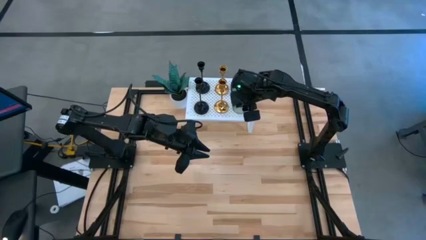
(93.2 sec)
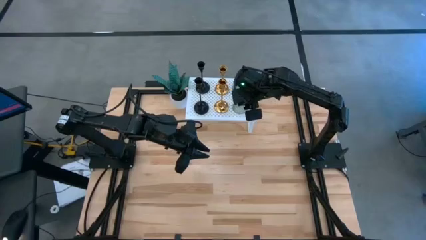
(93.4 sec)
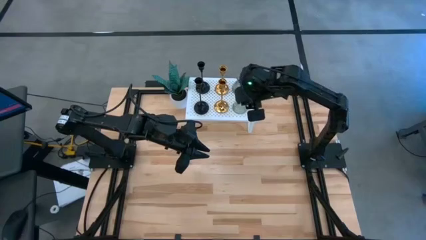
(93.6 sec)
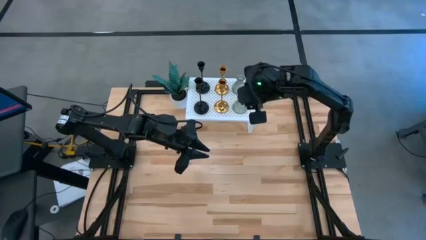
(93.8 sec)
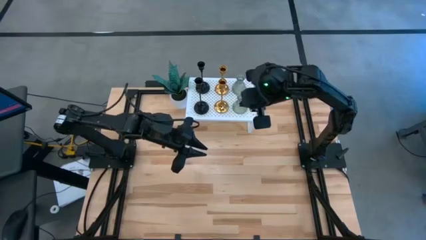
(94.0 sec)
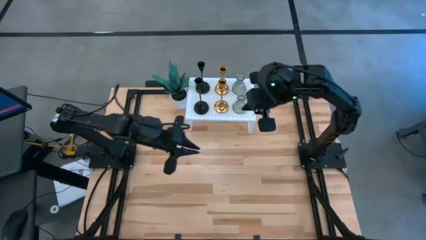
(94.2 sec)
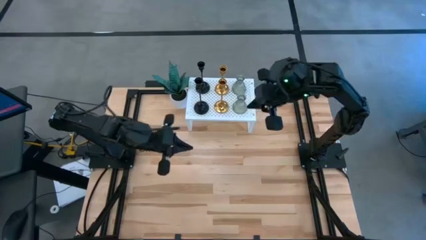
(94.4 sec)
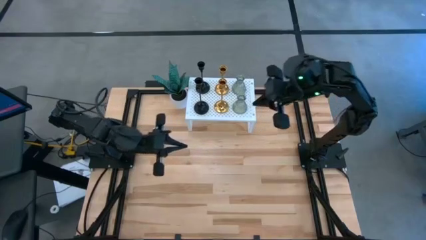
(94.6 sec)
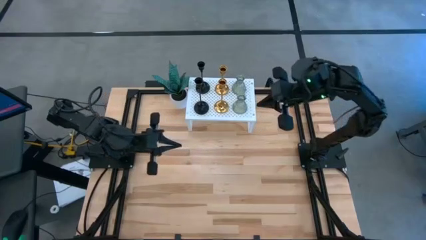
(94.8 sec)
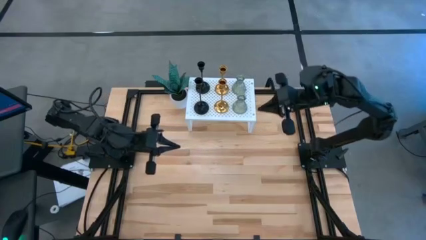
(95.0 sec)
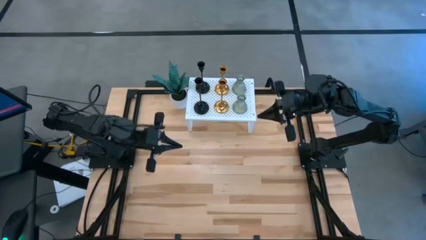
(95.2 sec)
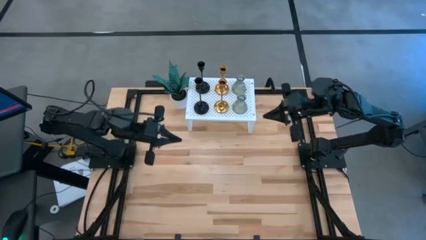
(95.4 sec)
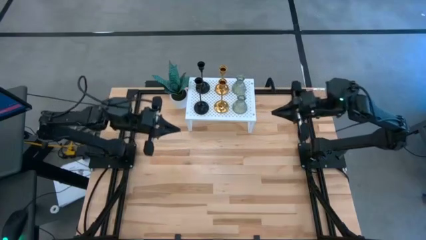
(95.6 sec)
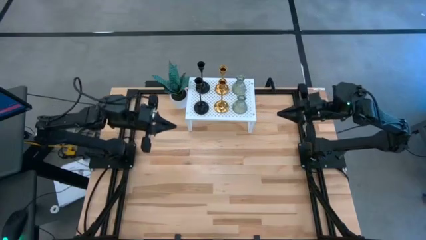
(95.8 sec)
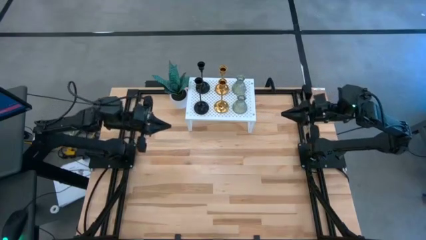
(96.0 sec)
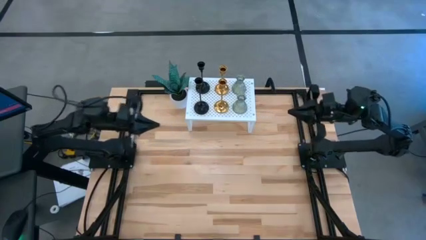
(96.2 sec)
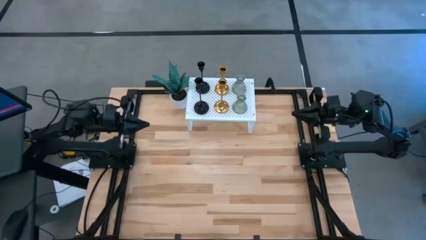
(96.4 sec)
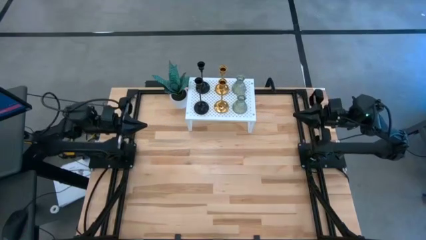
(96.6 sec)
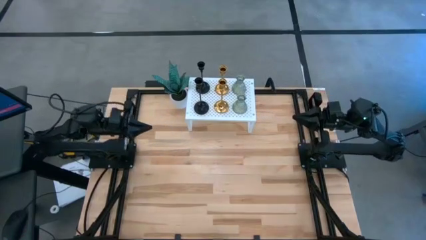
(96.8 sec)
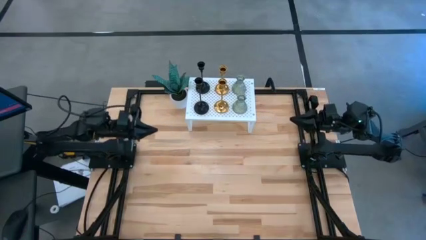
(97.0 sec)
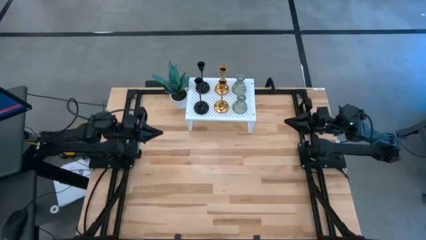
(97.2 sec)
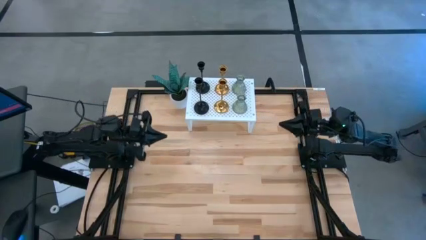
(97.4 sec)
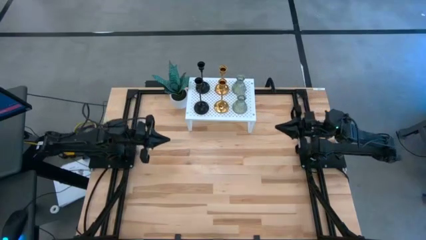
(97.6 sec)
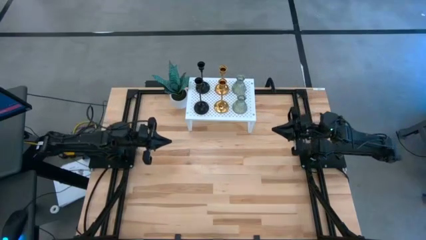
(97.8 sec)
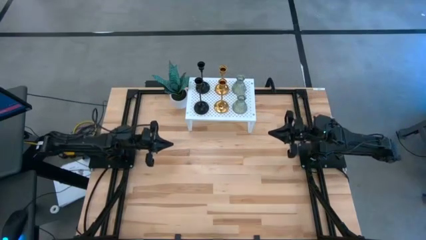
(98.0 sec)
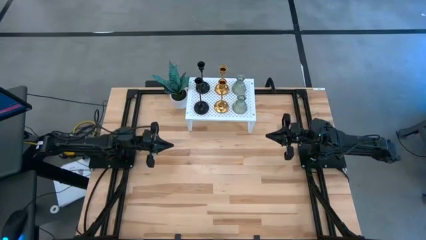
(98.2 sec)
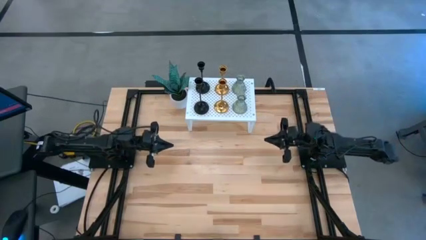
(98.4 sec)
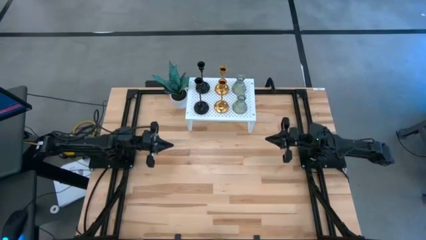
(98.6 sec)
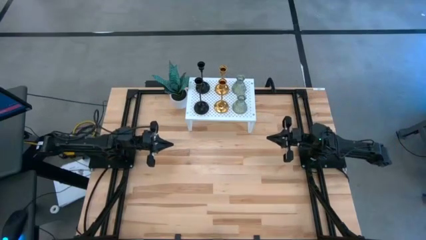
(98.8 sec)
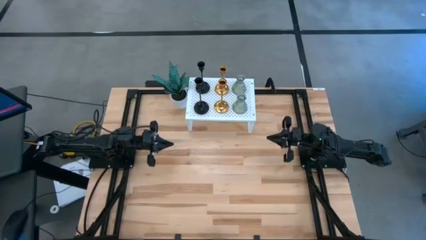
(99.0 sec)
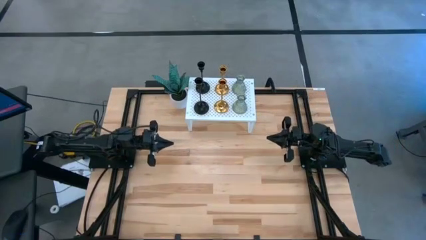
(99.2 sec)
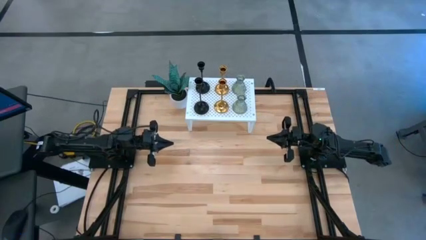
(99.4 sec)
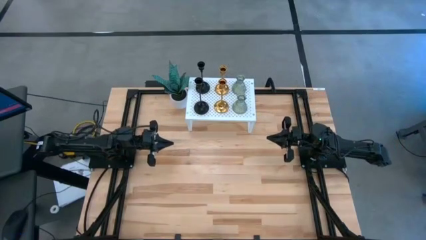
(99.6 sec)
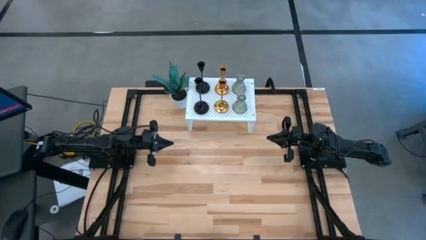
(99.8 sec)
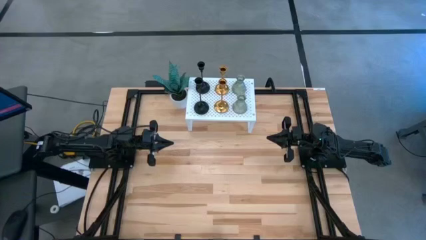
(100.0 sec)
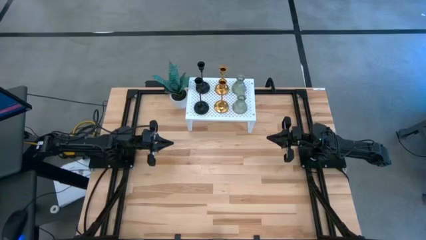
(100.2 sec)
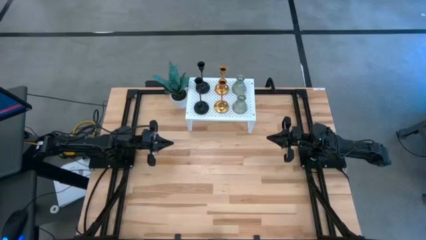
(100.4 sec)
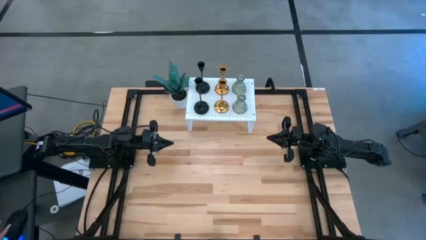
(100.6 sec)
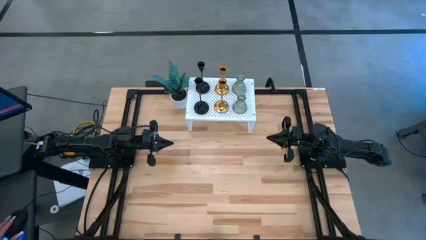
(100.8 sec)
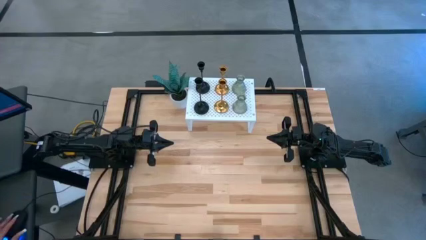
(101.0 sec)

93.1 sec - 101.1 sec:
Task: Pick & Place candle stick holders
Return to Home Position

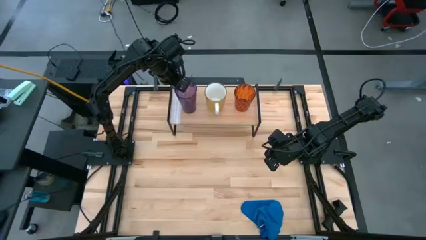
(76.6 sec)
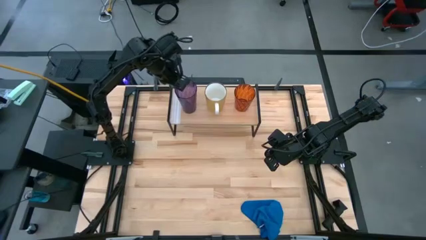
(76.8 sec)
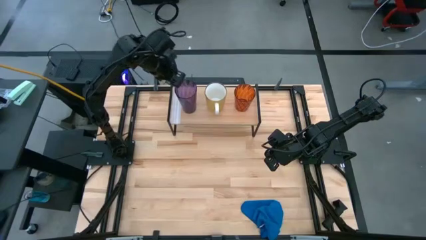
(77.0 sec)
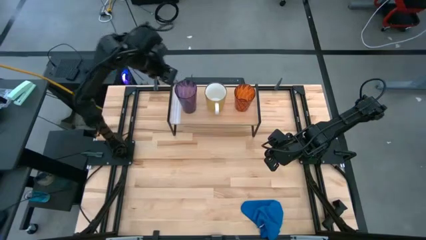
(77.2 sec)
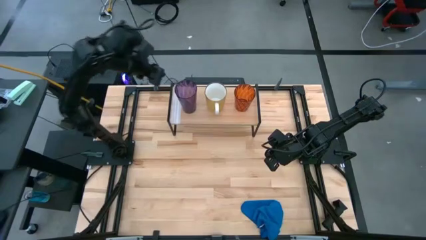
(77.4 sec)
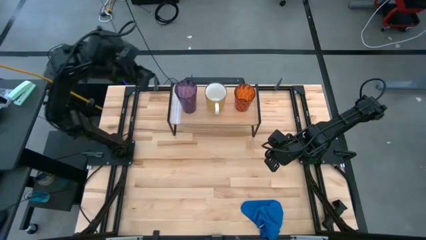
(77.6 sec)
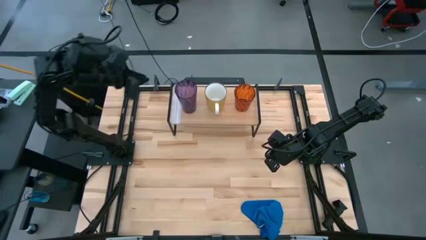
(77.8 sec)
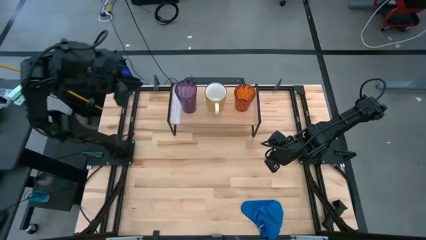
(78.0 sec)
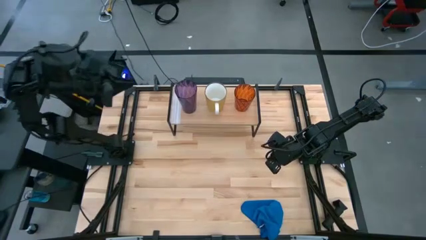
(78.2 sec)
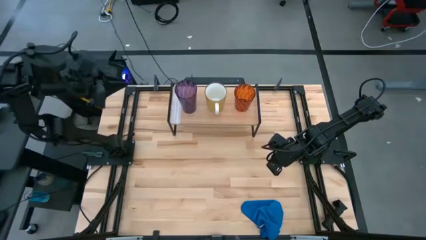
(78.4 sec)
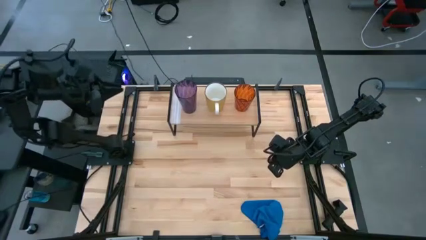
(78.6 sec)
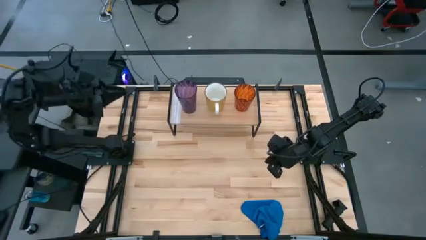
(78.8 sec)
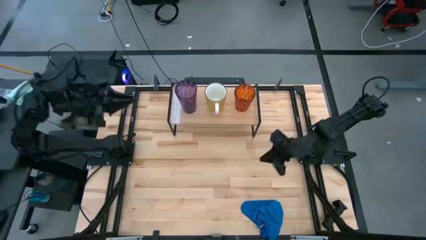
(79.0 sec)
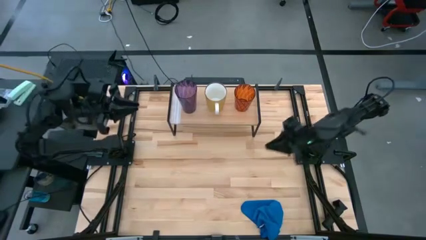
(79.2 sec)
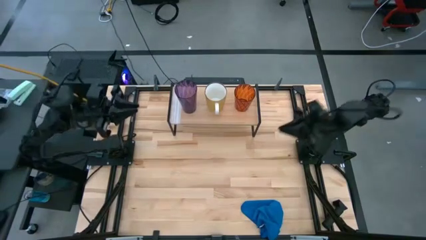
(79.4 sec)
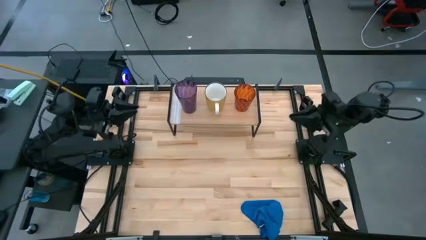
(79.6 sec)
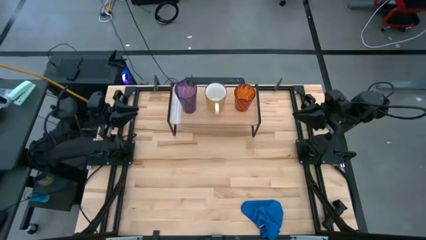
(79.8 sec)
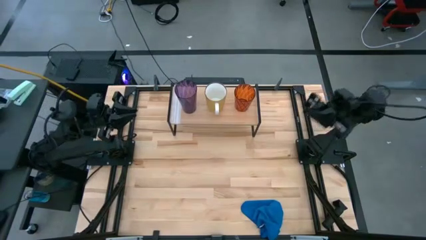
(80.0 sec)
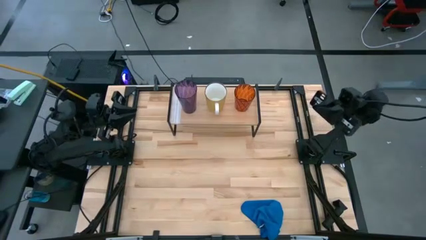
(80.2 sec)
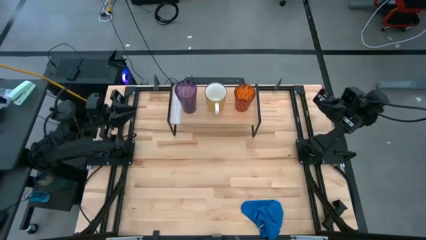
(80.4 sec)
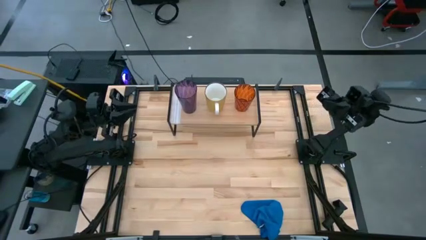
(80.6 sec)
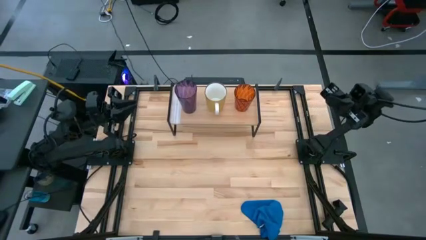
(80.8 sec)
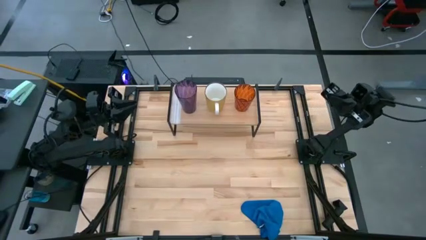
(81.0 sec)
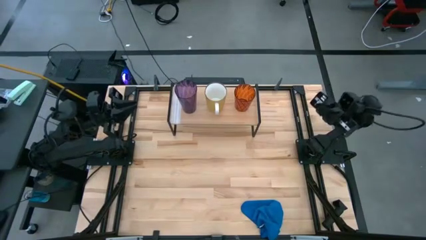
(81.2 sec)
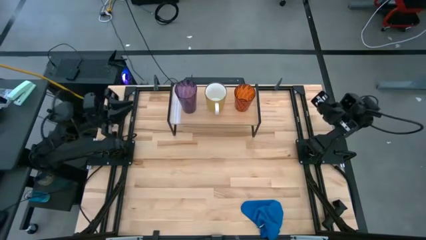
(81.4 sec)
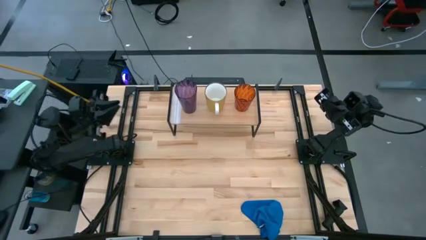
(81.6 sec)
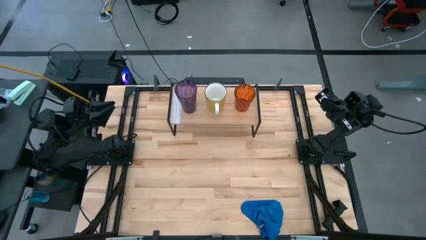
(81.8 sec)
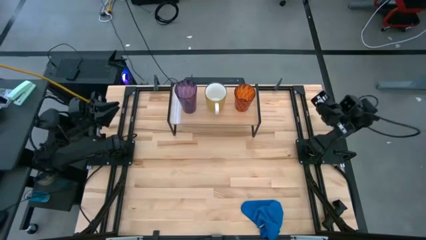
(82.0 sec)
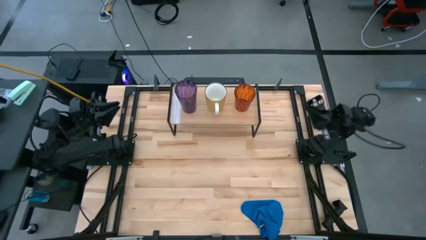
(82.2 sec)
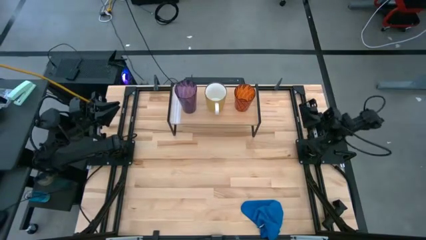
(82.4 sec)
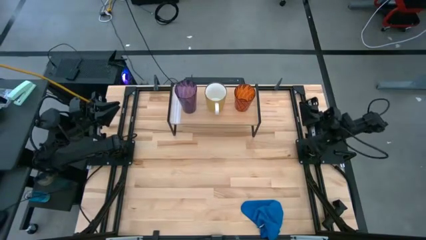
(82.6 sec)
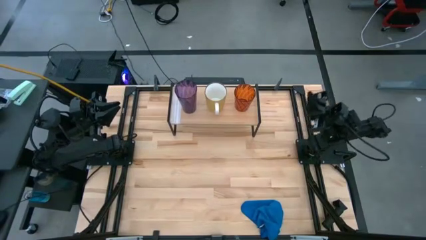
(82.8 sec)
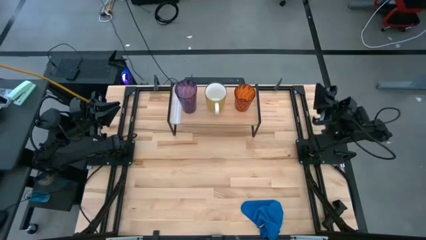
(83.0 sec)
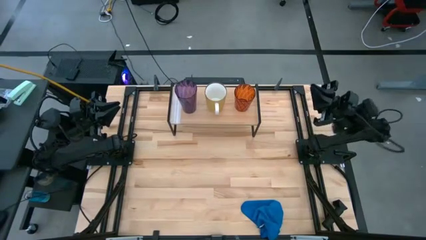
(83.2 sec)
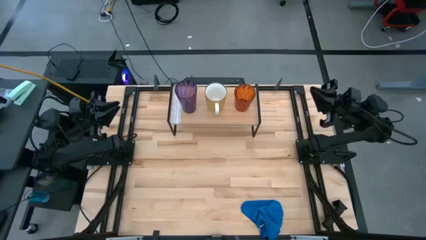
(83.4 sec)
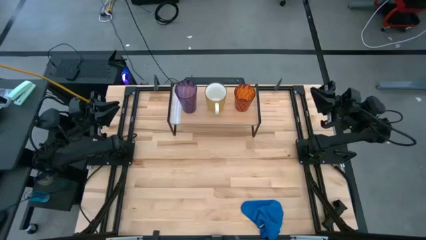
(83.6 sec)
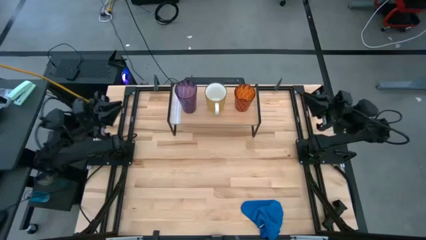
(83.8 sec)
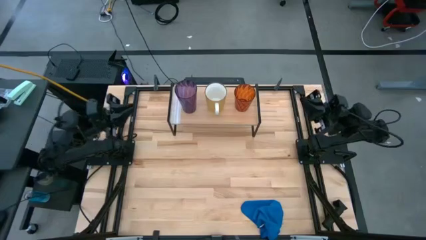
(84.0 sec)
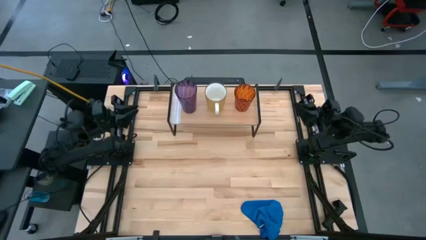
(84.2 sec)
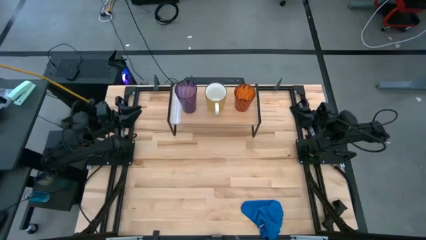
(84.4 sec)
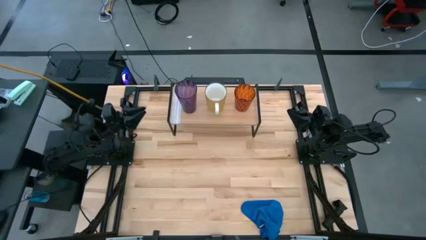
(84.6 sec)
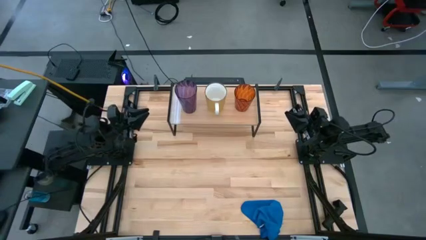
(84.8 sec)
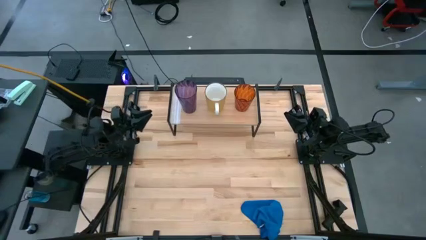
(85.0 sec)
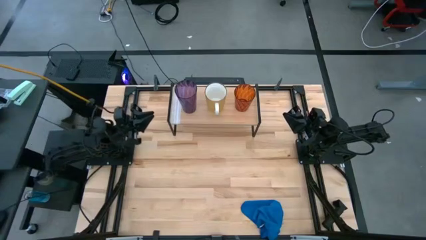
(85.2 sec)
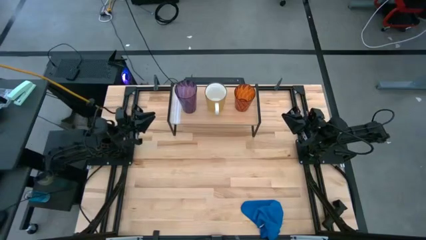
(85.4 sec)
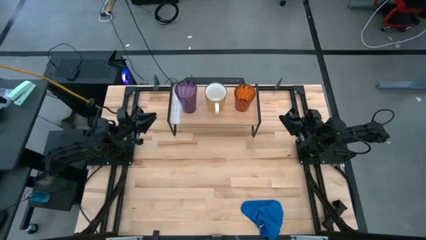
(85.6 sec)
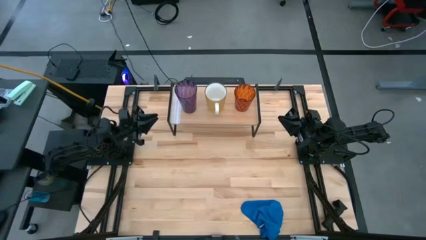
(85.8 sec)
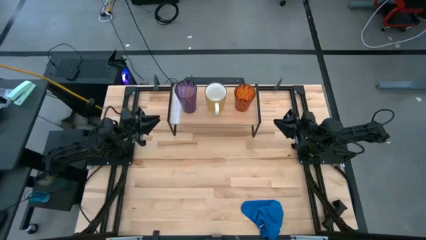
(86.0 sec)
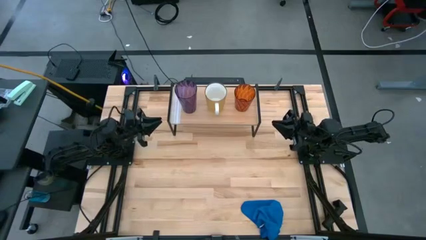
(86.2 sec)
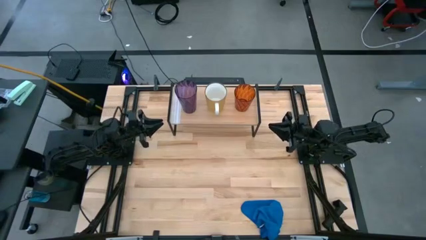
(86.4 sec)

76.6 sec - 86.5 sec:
Task: Stack small to large cups/mugs on shelf
Return to Home Position
